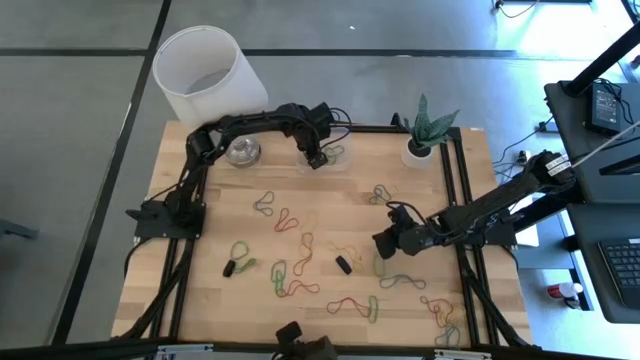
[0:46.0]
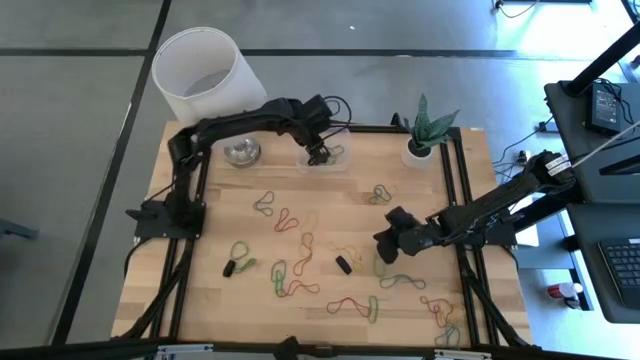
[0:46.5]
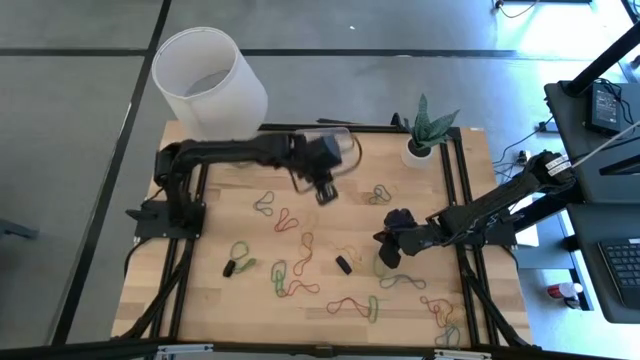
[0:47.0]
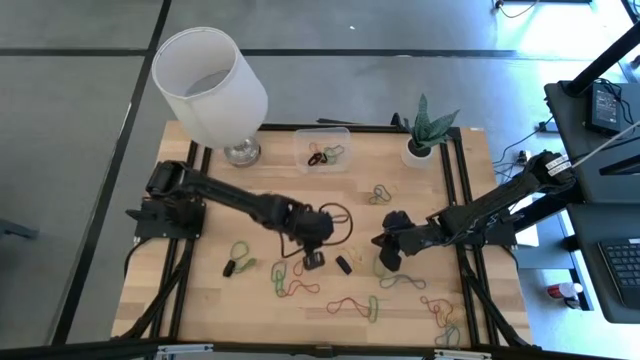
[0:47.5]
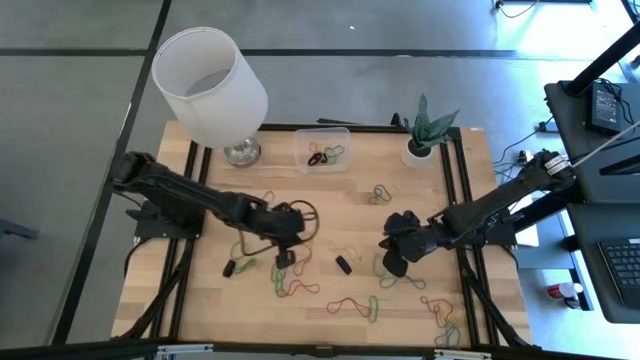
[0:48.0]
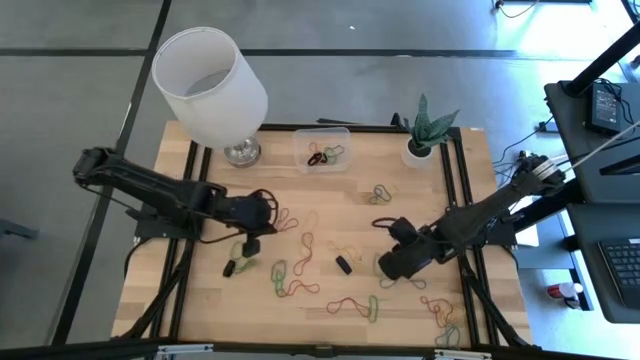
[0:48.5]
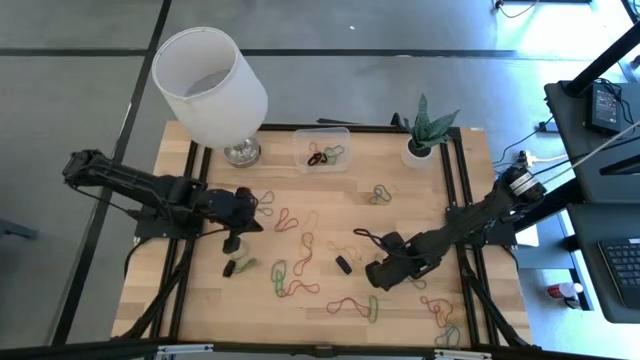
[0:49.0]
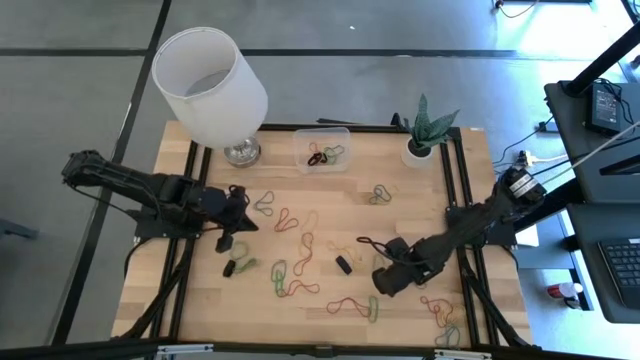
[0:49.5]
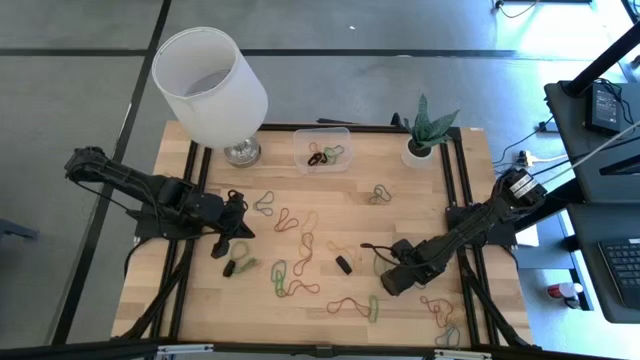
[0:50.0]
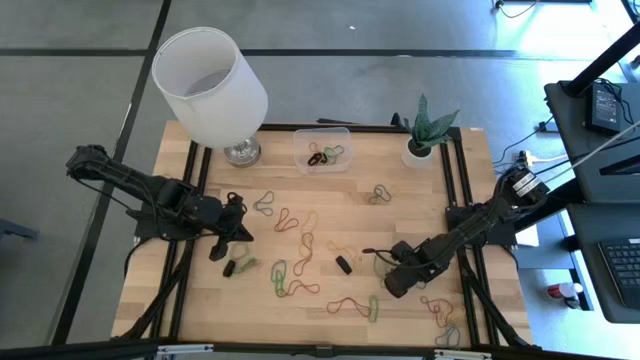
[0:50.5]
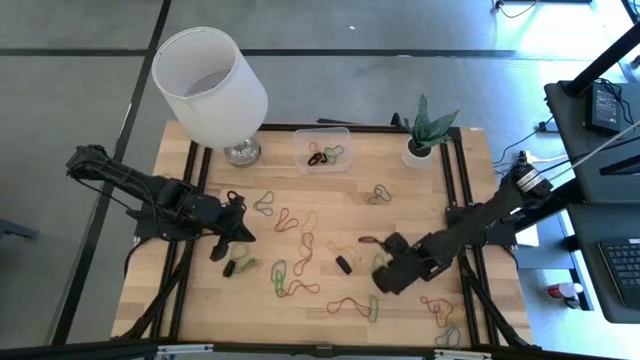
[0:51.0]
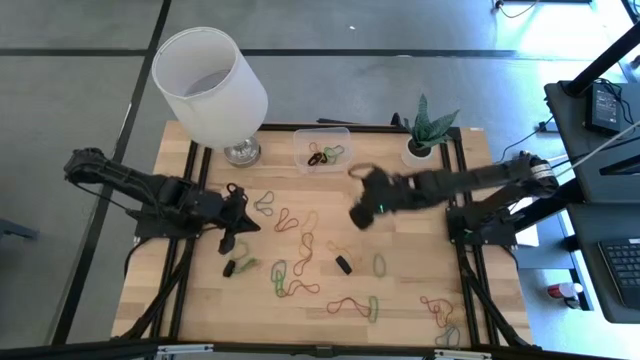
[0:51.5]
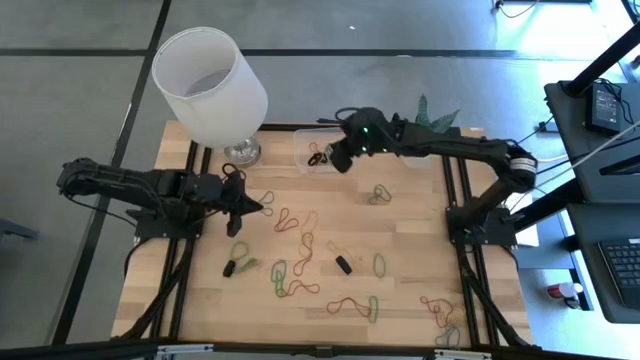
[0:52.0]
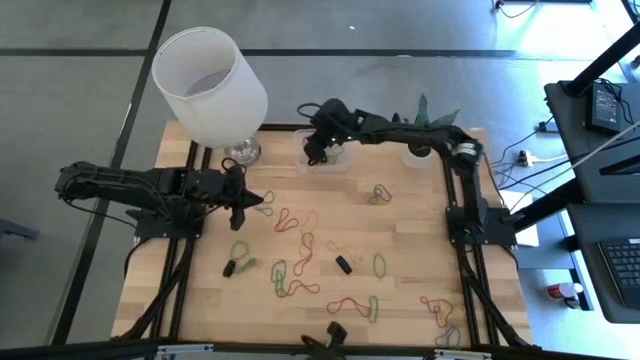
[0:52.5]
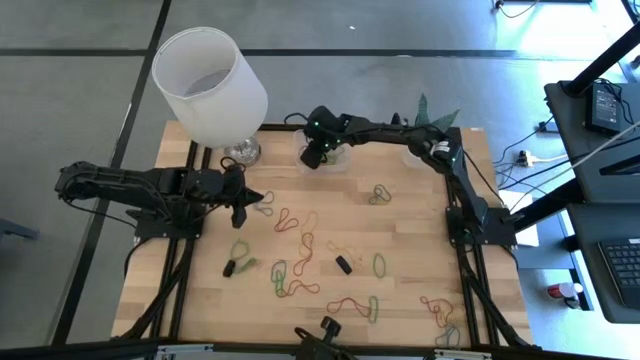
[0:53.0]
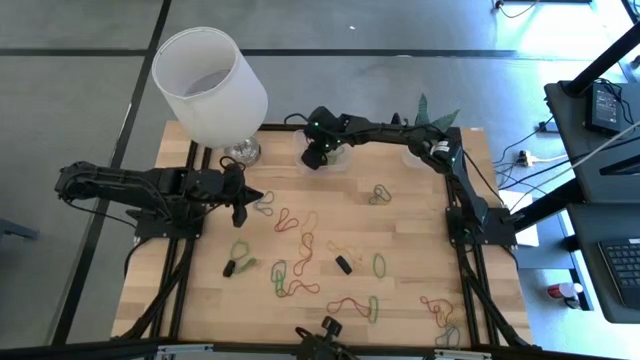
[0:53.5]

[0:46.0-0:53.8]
Task: Pick and place rubber bands into bin
Put the blue rubber band into the transparent bin

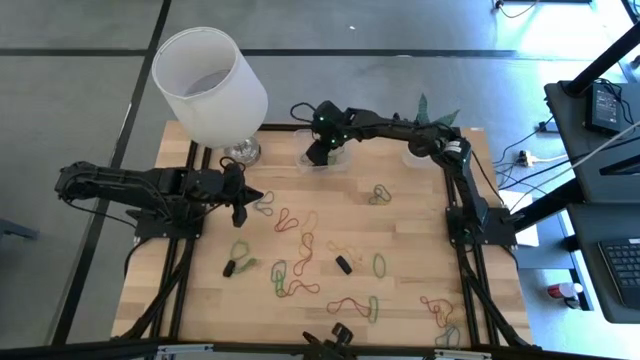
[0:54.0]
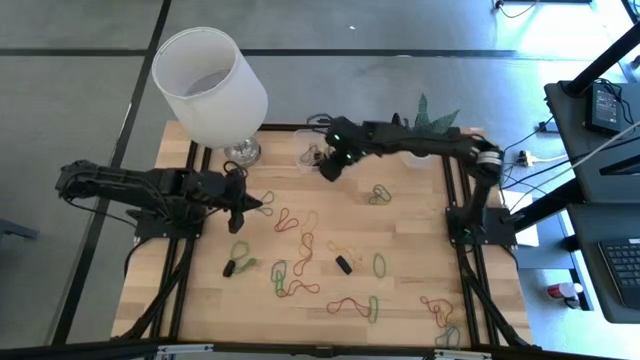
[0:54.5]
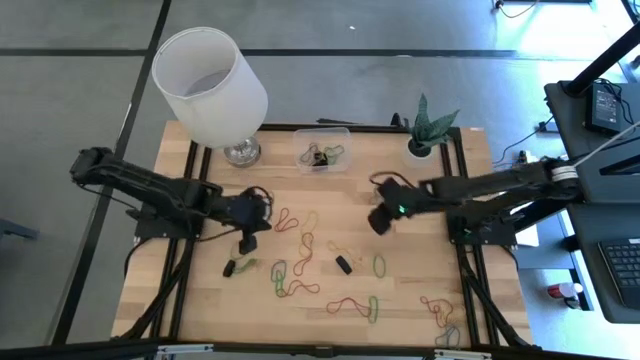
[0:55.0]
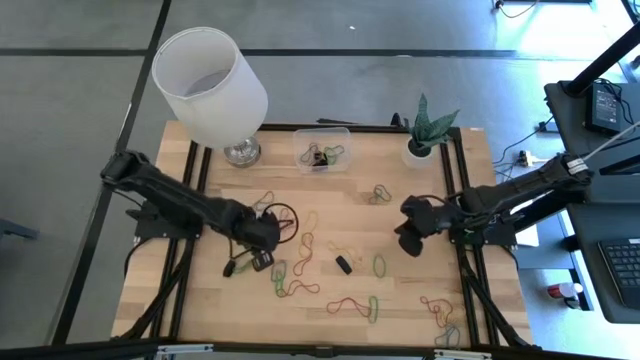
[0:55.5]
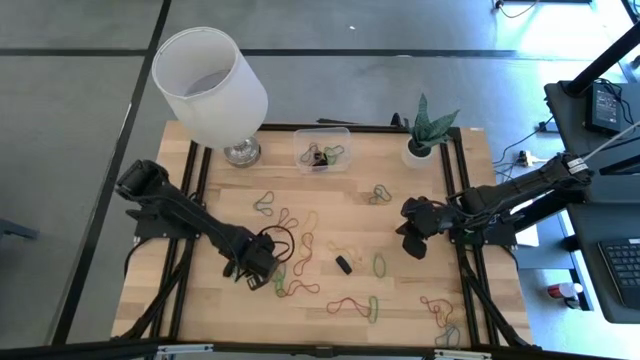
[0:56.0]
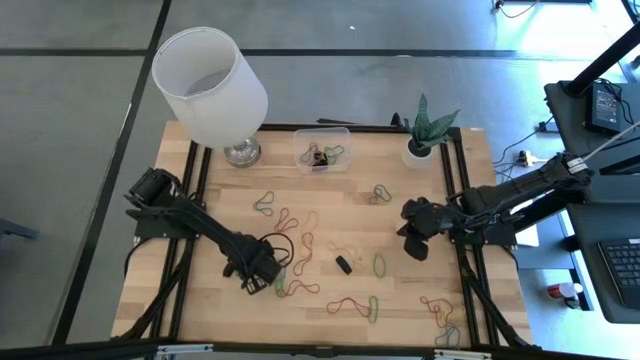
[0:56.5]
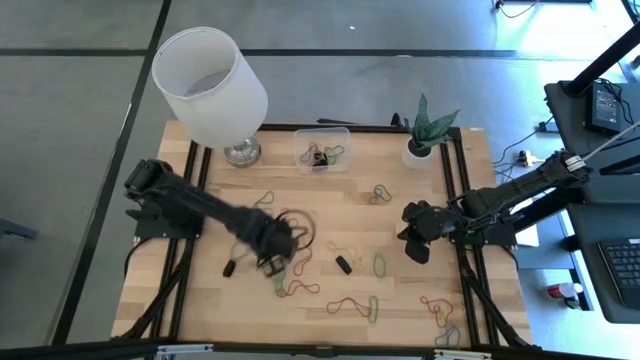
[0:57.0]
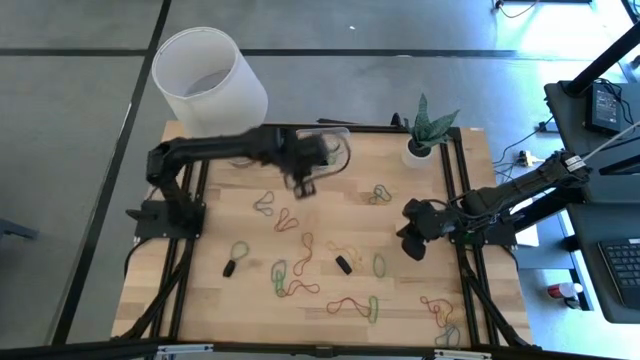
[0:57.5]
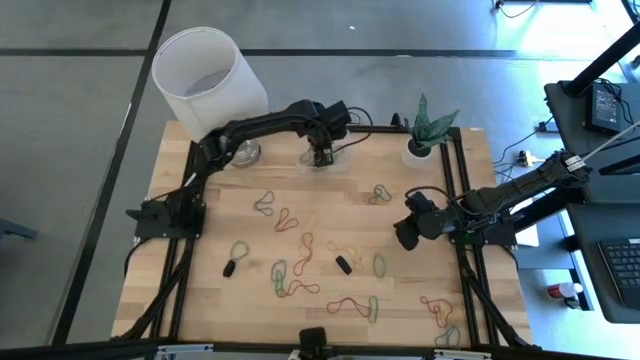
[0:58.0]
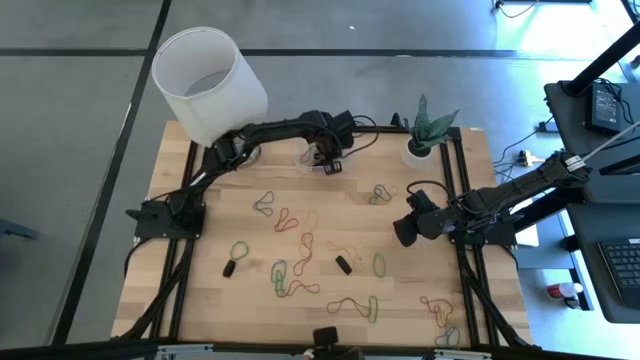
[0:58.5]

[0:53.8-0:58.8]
Put the green rubber band into the transparent bin

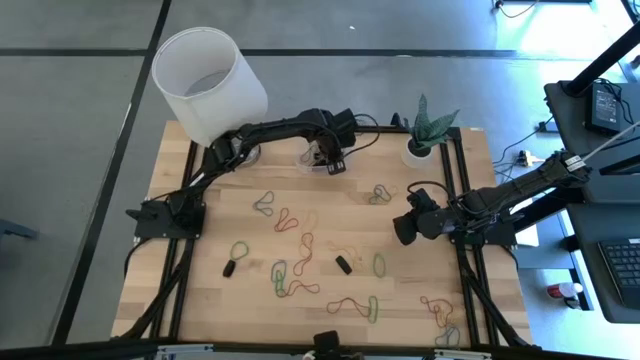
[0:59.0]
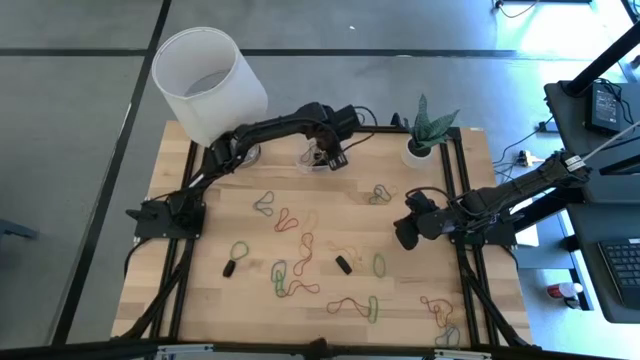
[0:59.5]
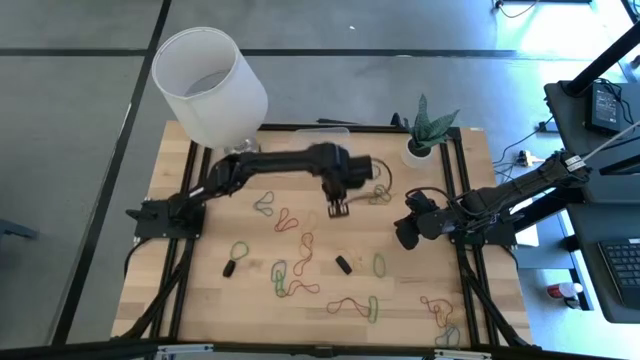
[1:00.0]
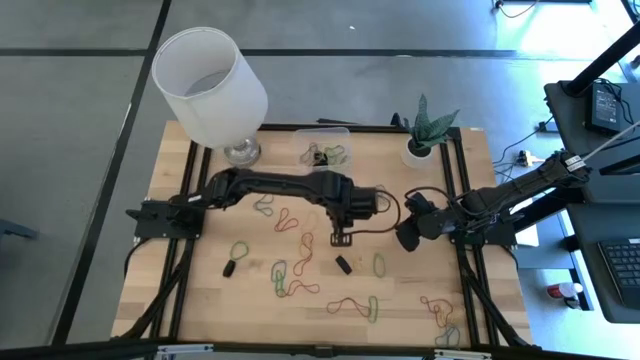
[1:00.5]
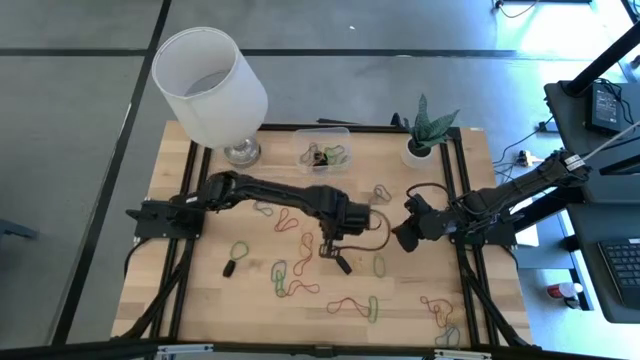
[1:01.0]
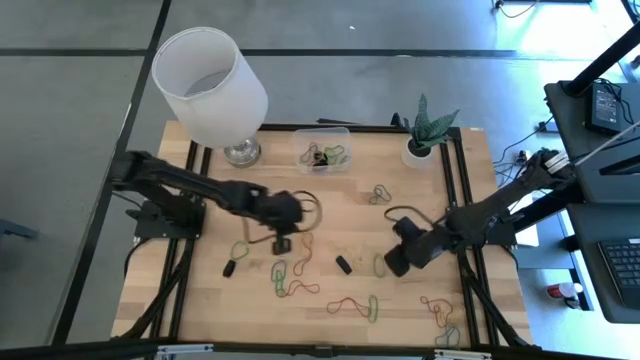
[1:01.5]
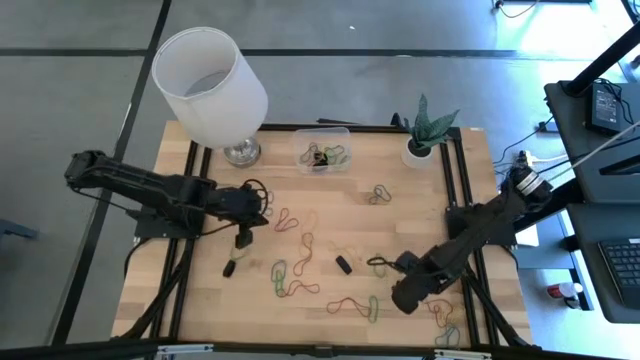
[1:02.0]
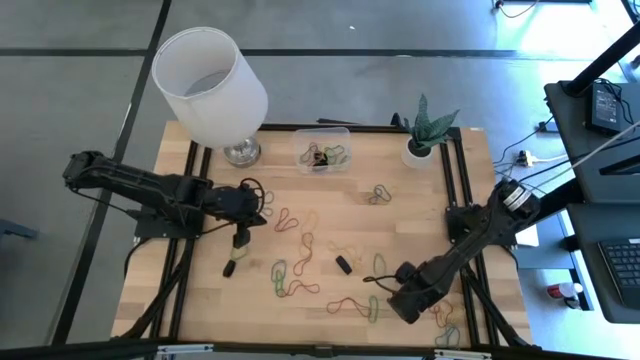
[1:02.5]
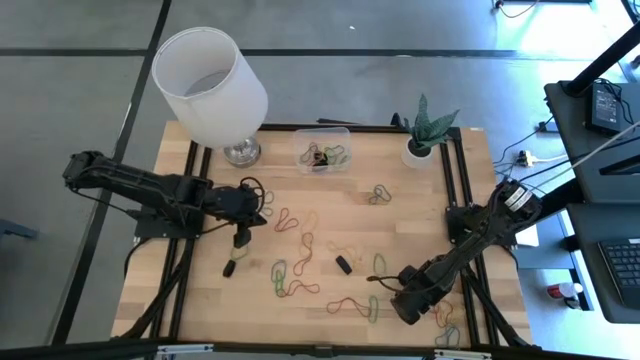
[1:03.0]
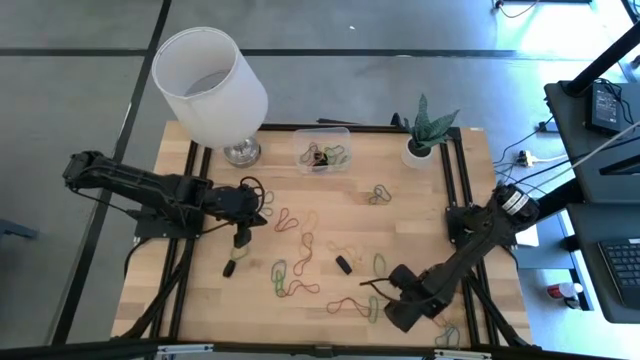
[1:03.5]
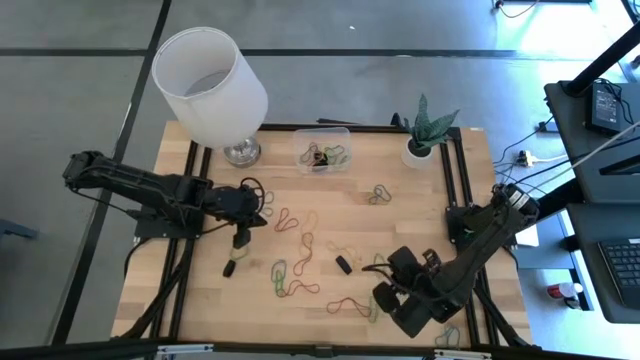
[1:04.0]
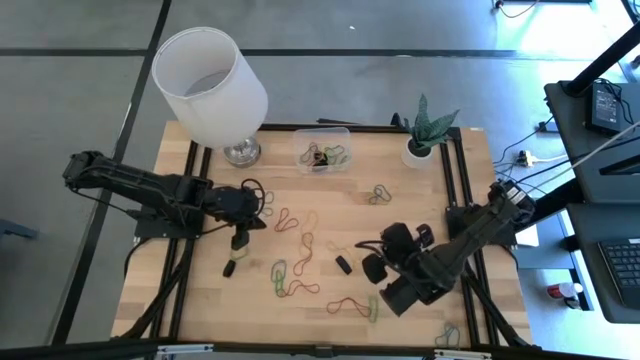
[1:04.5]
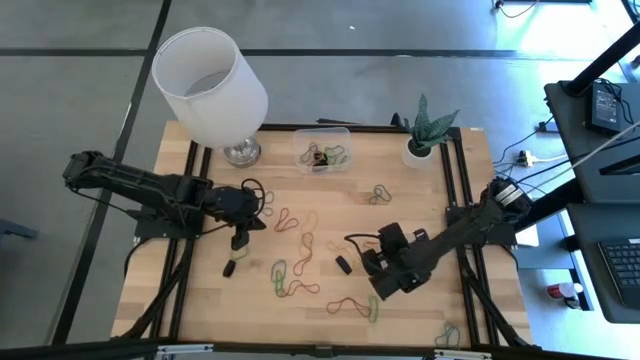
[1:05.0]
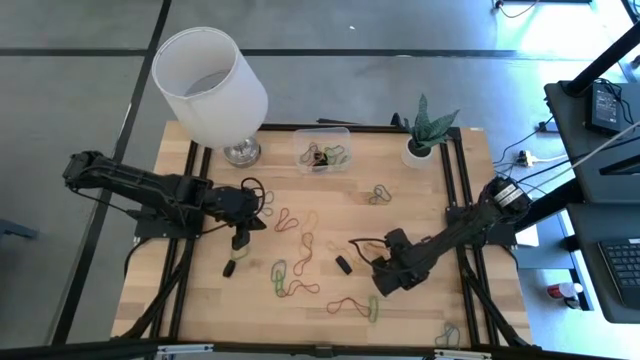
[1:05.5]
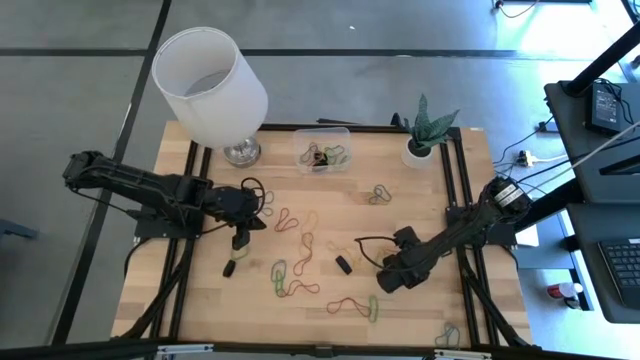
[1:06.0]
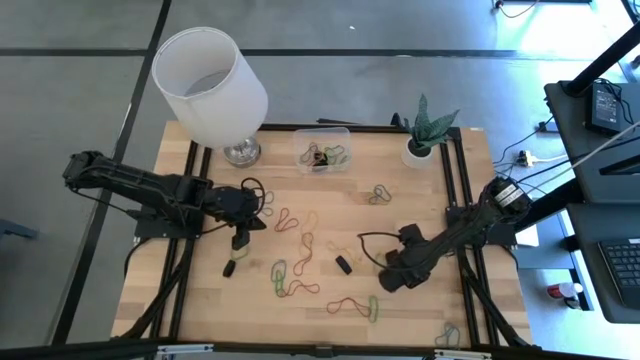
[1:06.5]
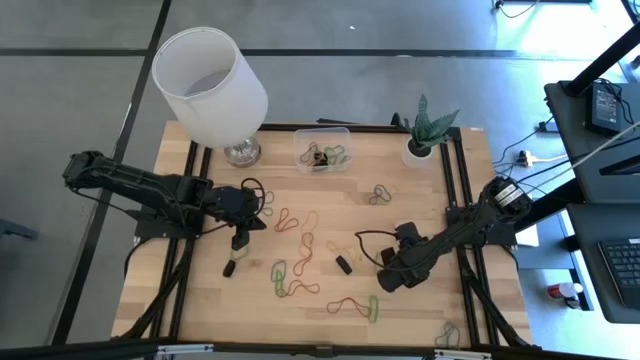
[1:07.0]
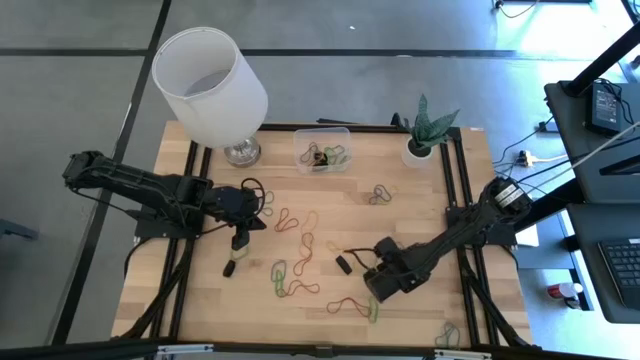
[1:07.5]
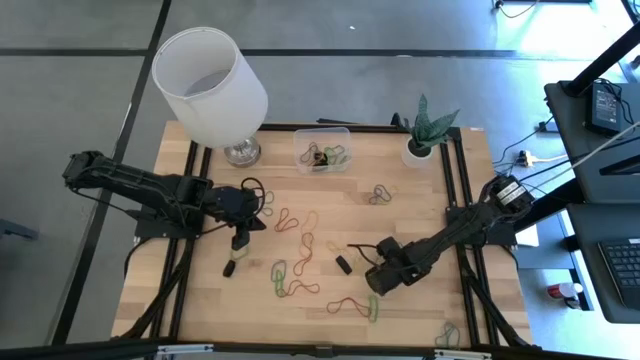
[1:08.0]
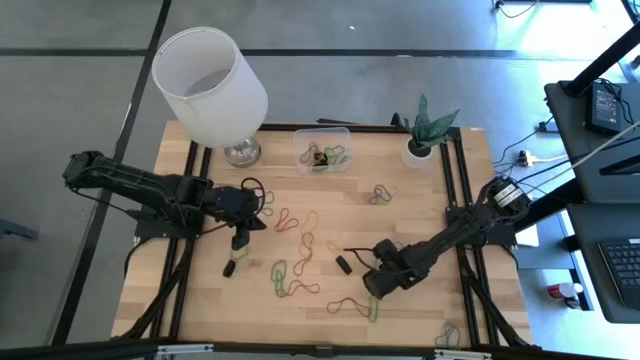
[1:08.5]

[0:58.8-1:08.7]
Put the red rubber band into the transparent bin
